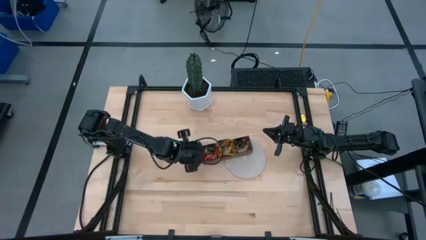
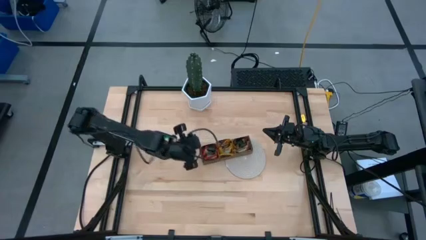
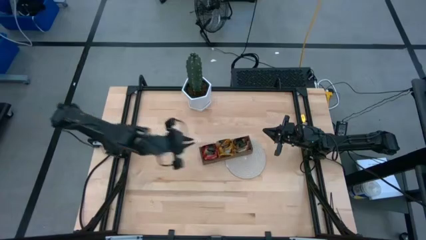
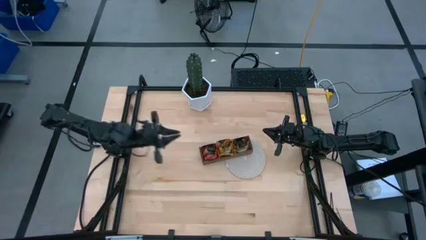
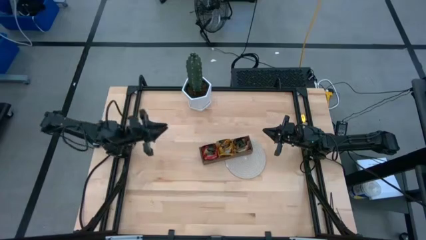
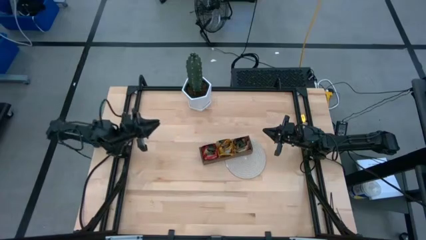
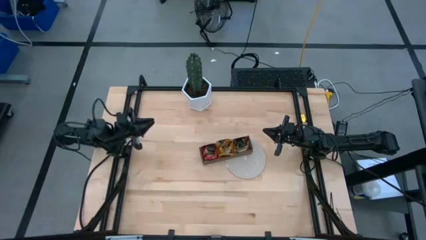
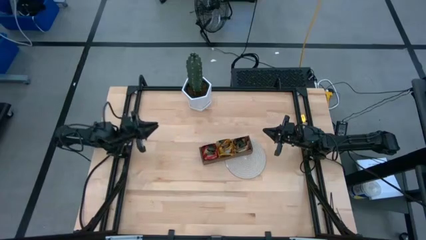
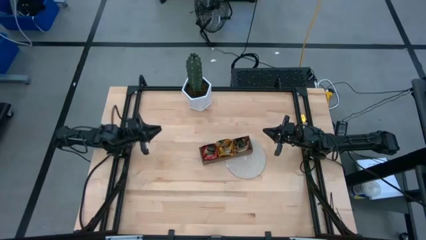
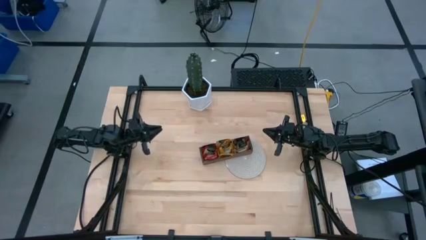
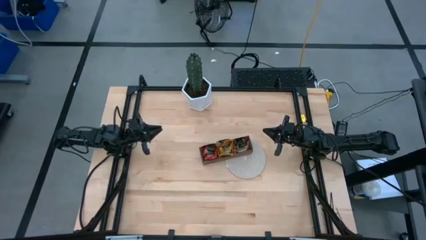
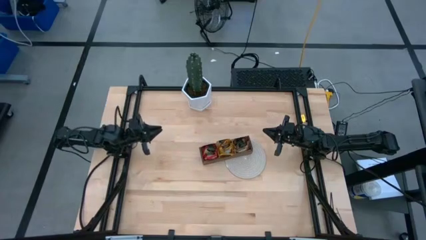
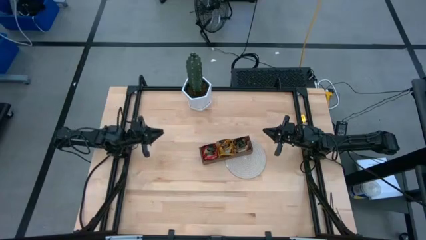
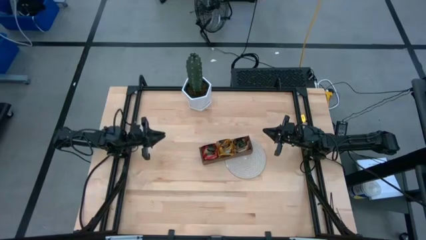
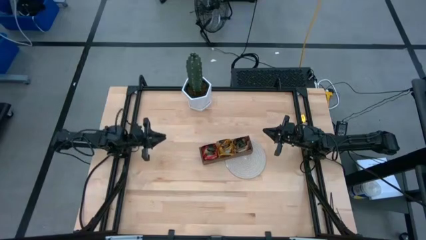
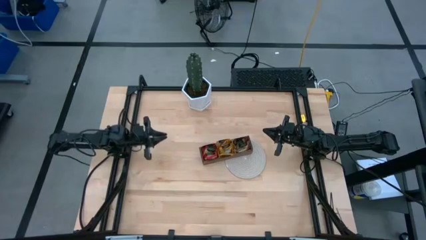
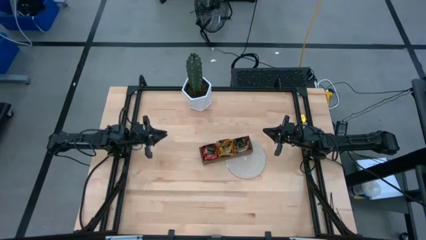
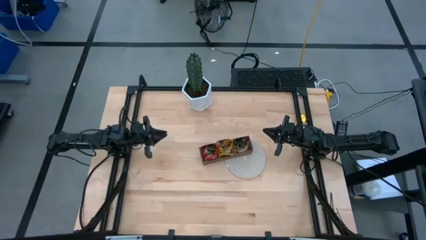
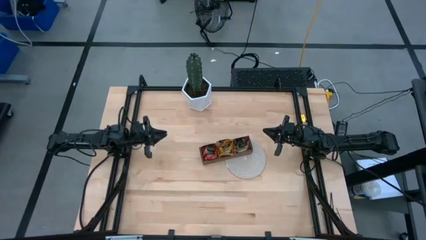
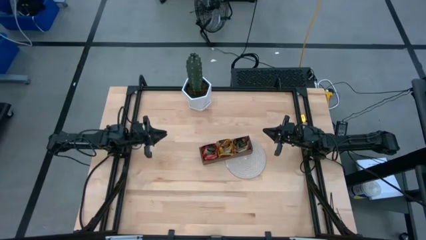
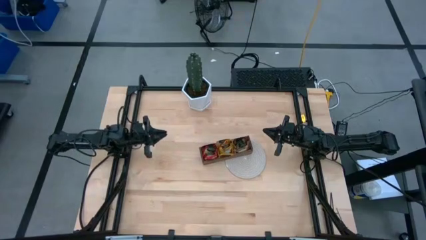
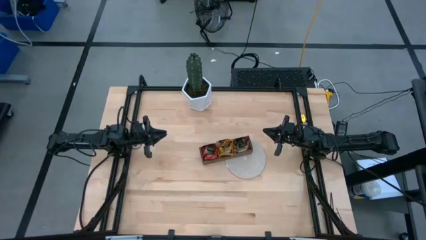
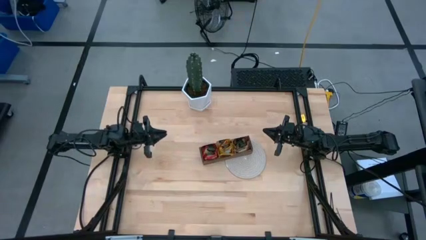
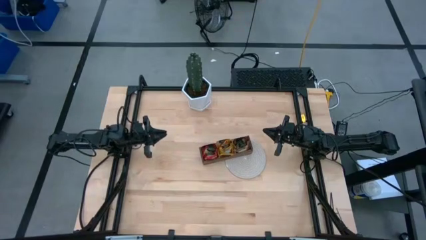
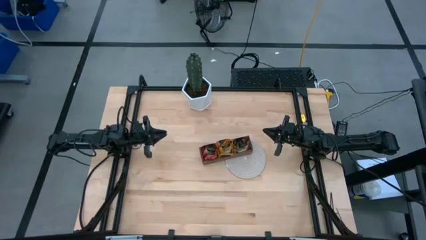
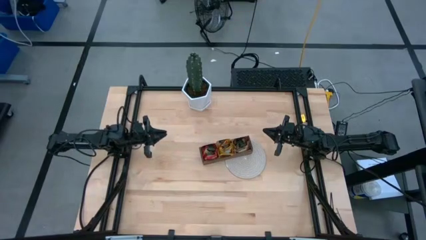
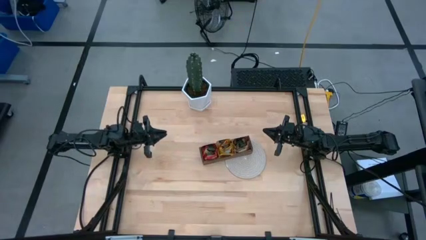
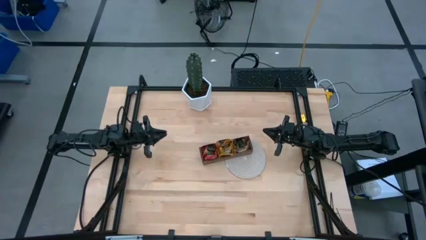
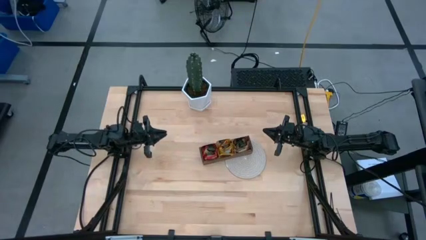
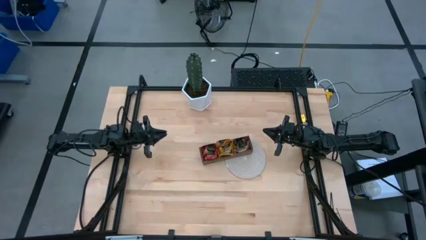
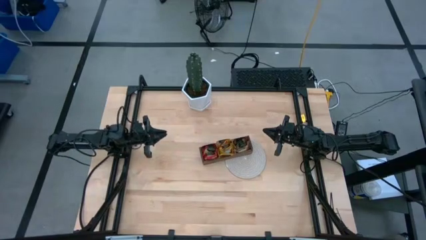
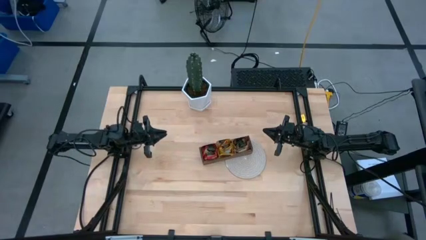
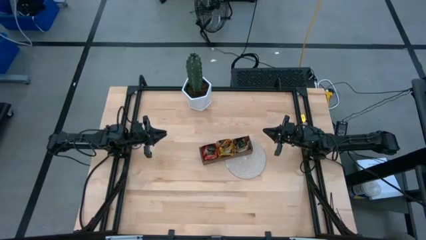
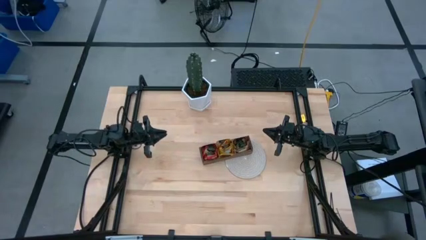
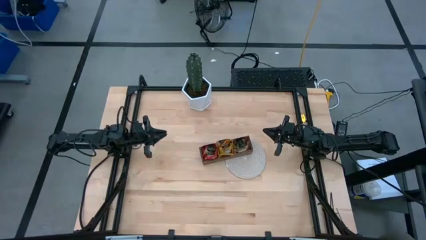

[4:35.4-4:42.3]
Task: Pick & Place Tea
Return to Home Position

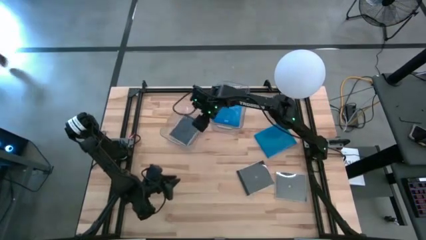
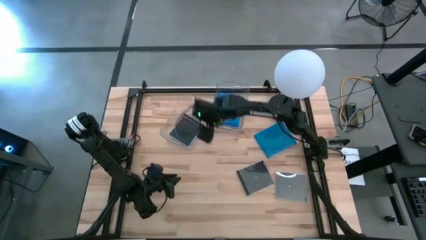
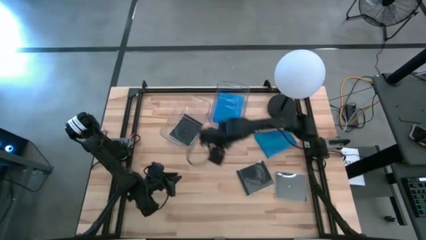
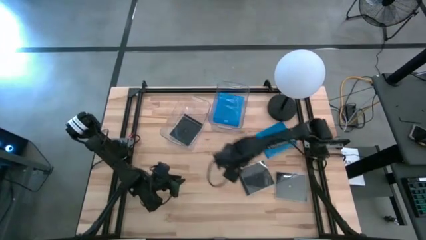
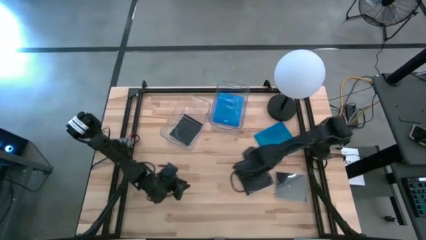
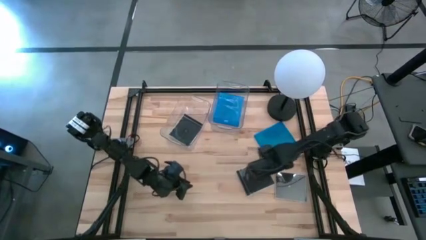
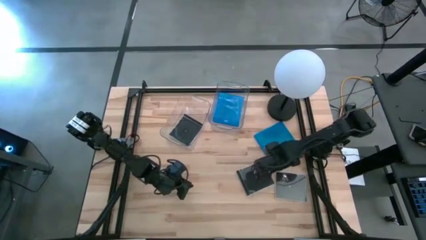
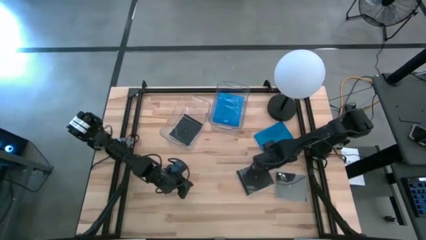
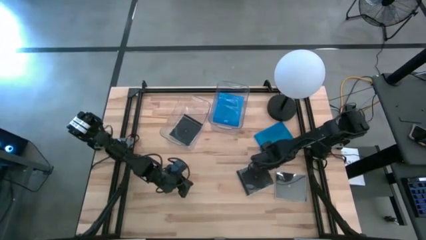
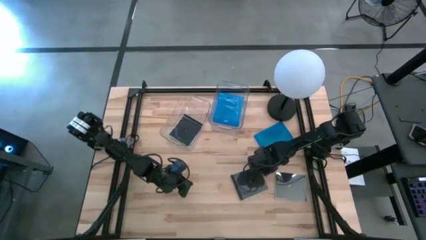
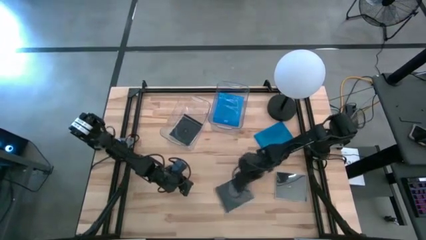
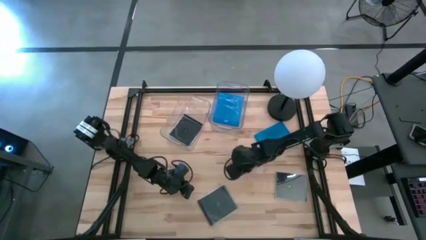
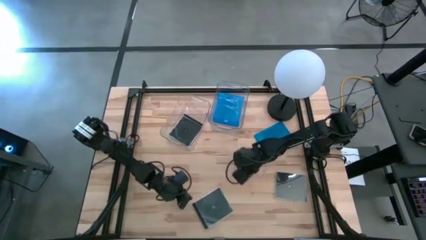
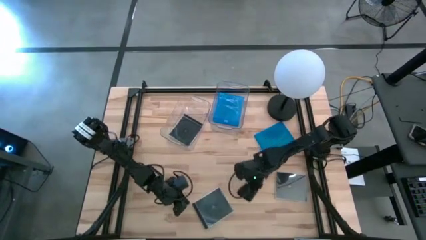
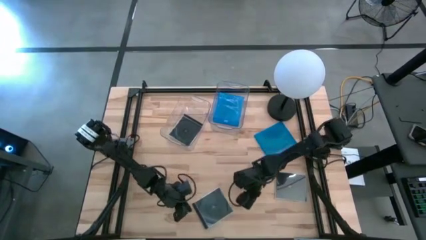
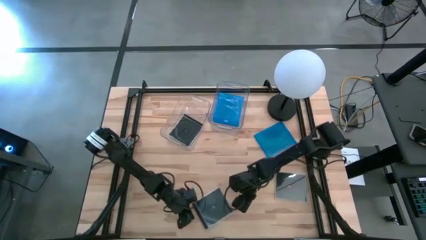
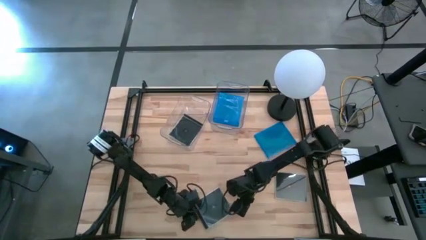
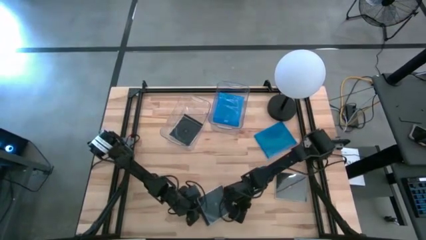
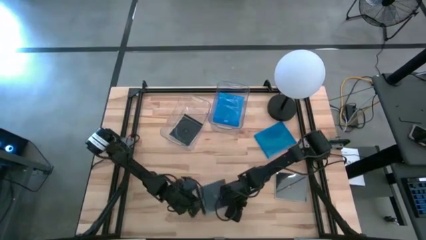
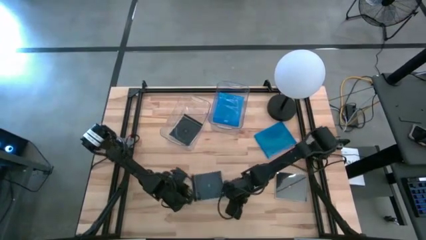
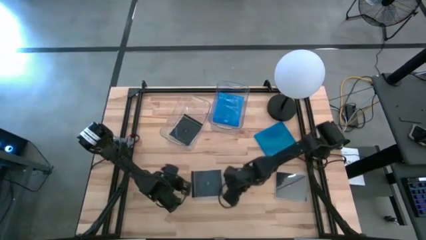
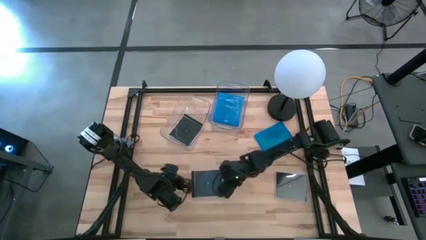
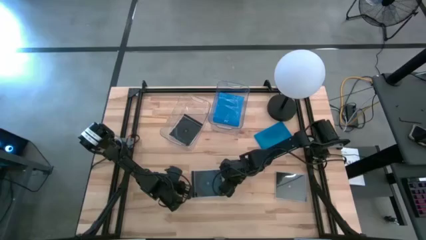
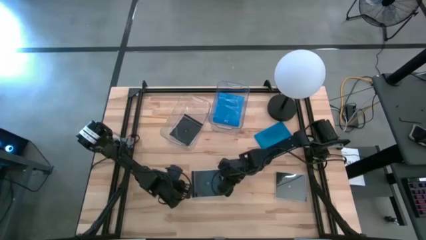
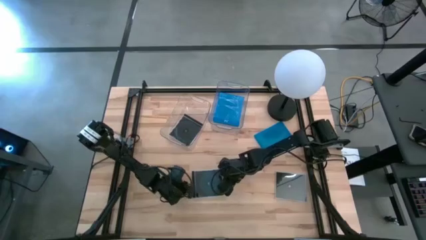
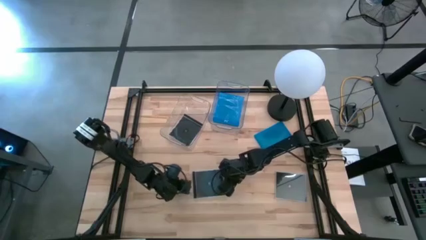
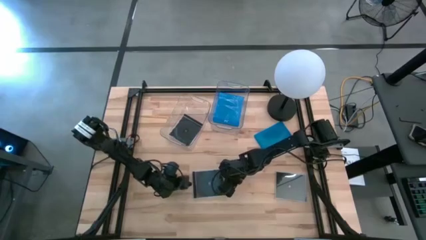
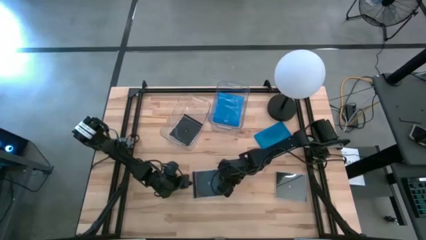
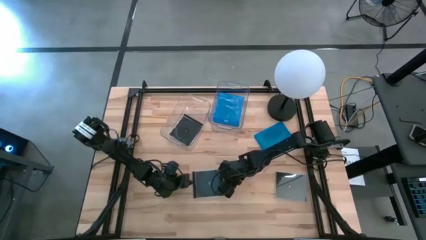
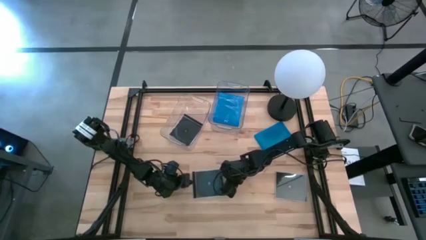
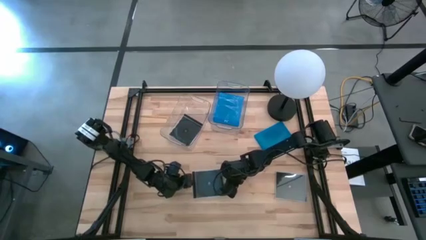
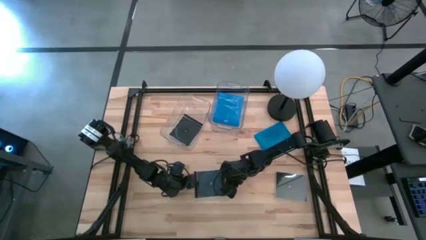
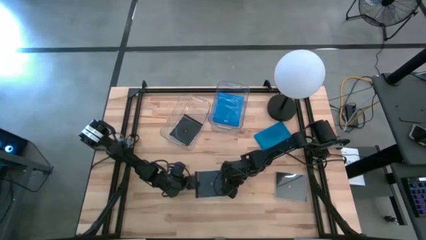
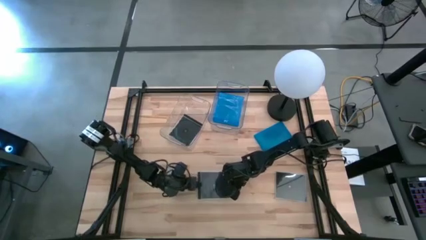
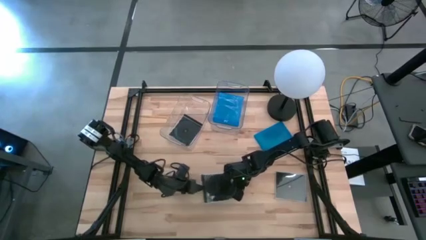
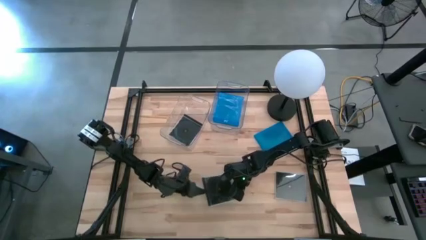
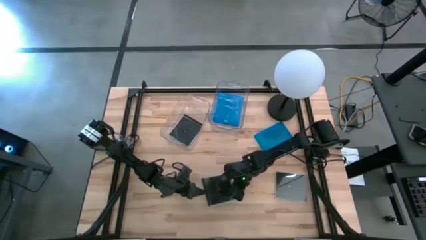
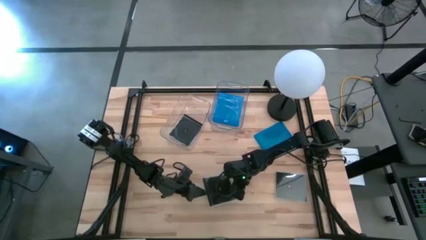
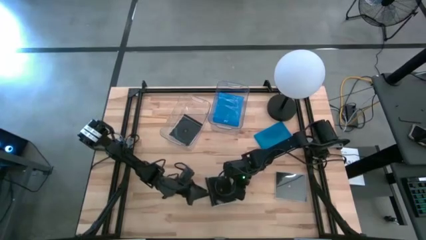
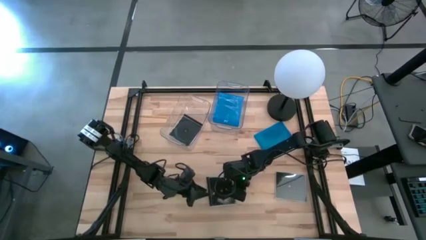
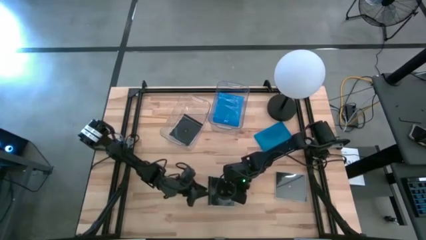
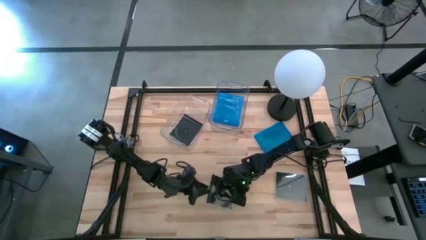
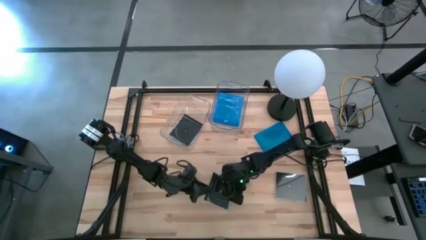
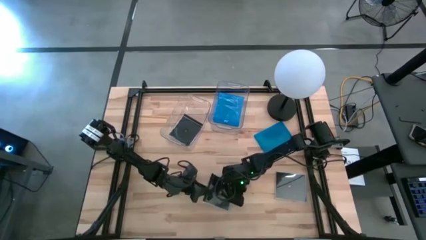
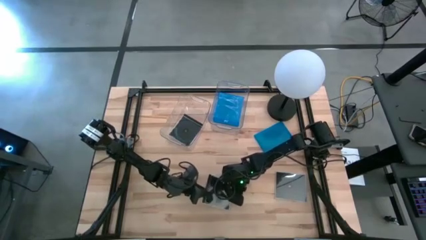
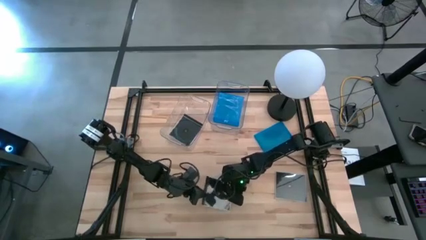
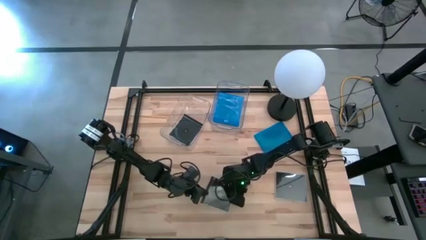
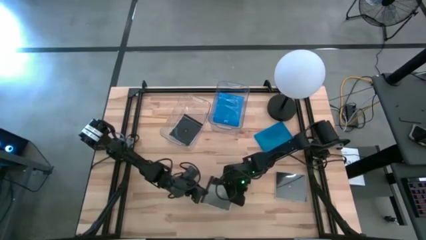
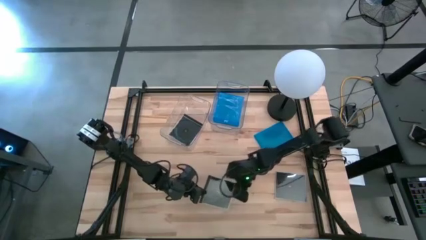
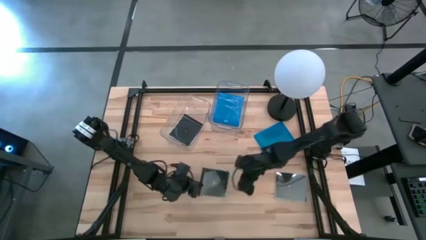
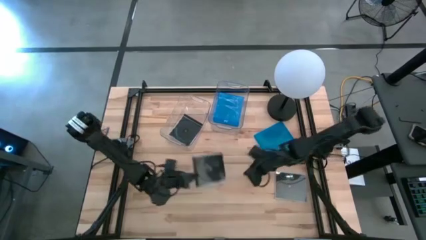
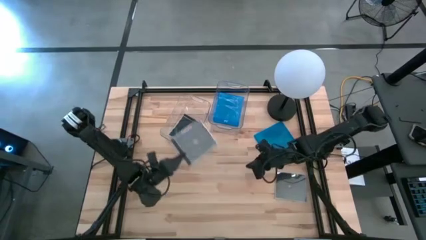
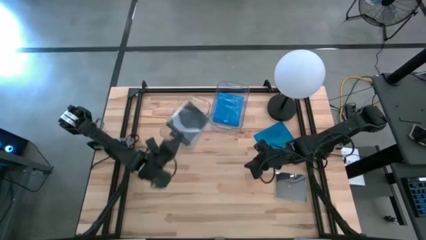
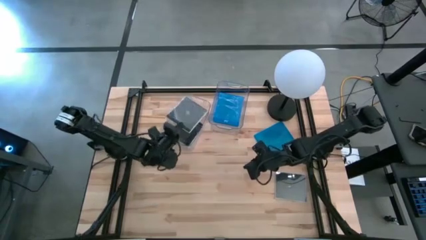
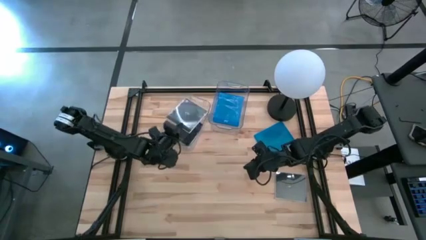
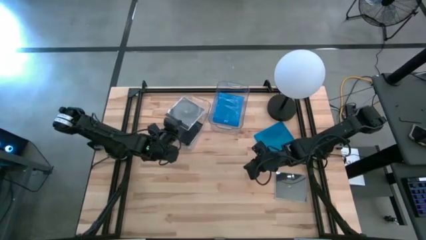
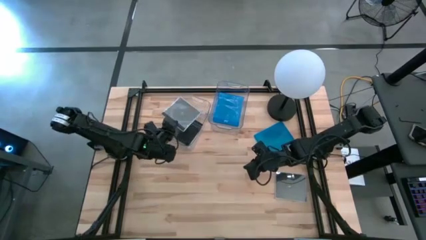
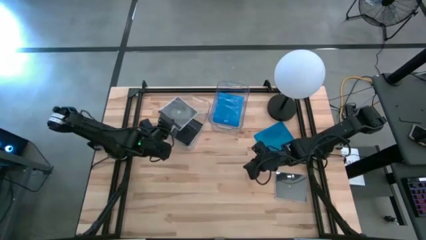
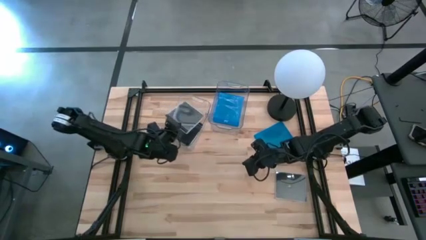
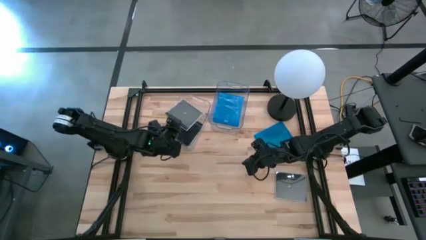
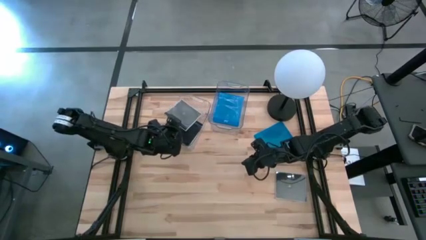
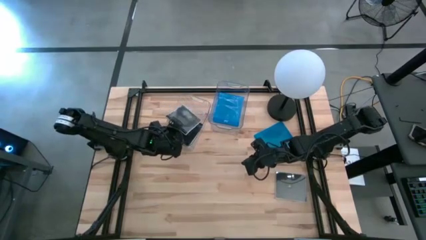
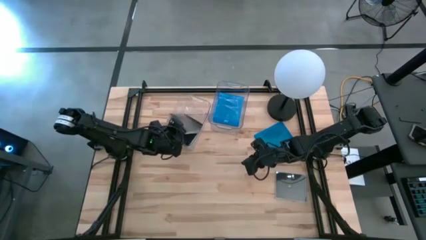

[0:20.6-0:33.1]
Task: Pick & place jewel cases by type
Put the left black cd case into the left transparent bin
